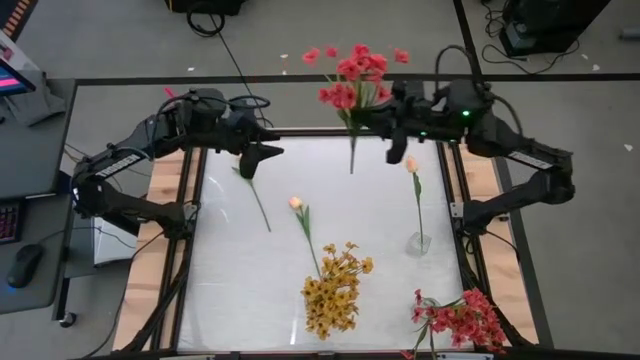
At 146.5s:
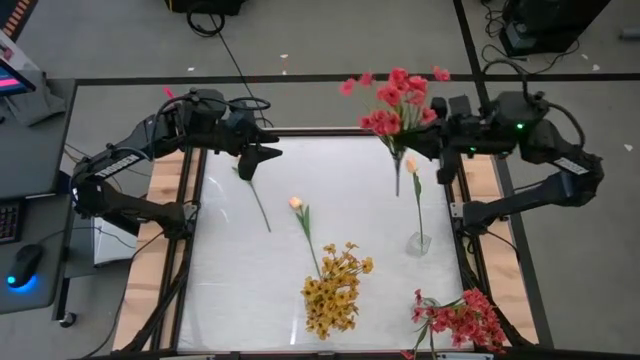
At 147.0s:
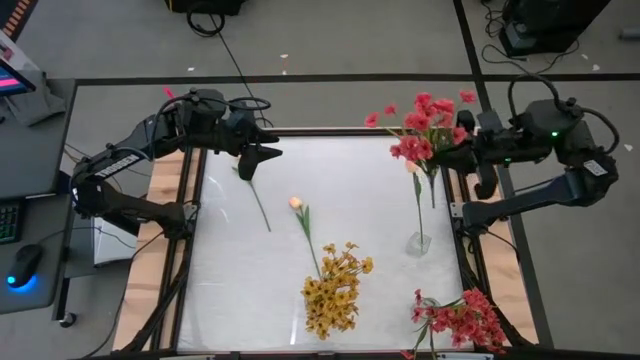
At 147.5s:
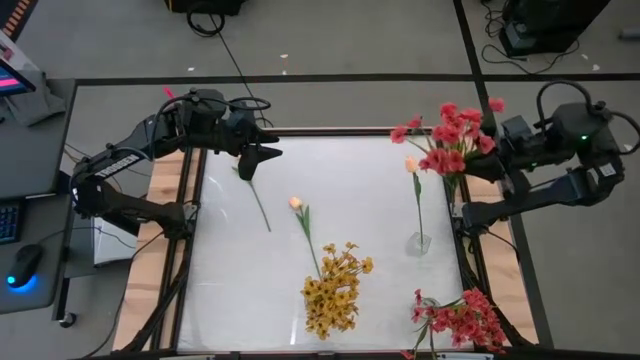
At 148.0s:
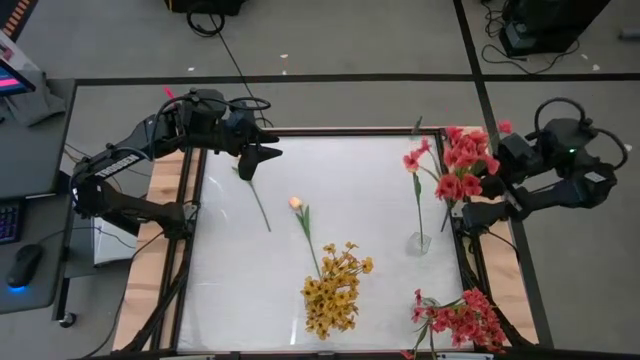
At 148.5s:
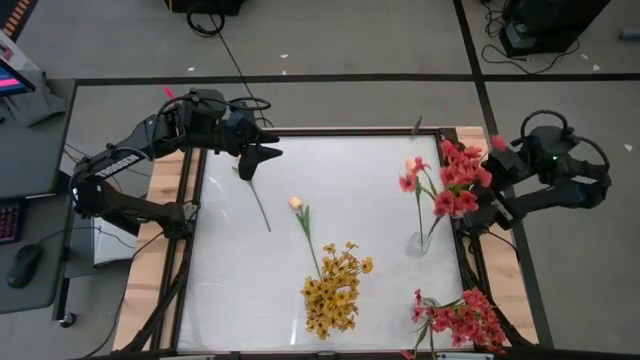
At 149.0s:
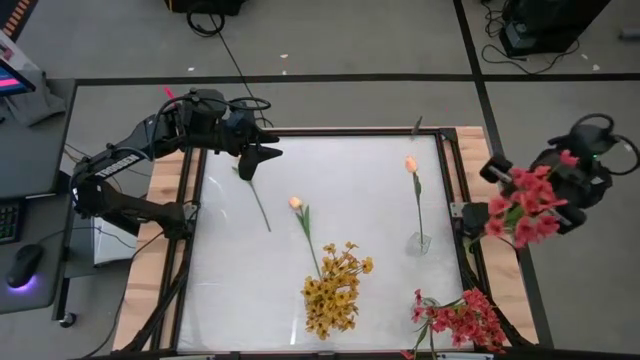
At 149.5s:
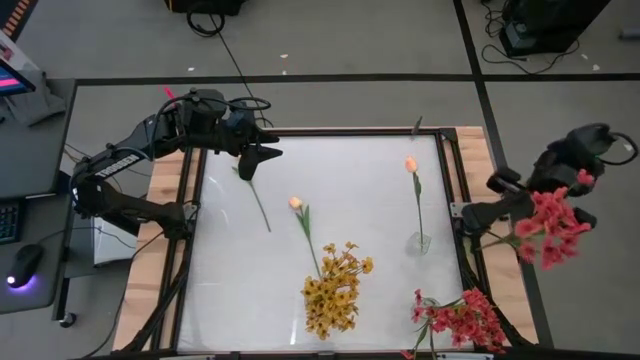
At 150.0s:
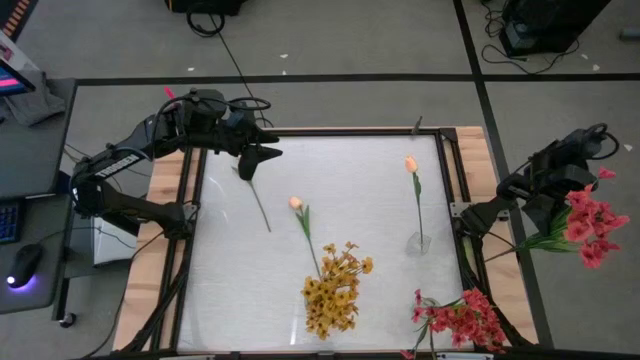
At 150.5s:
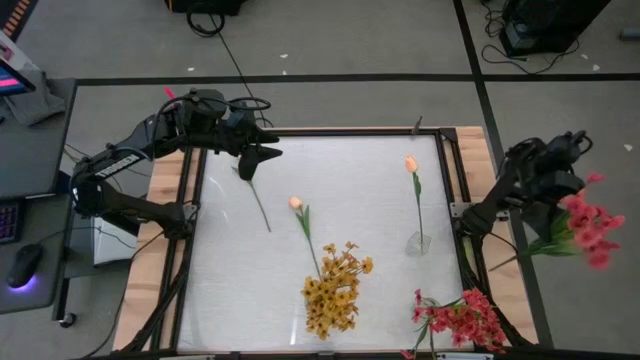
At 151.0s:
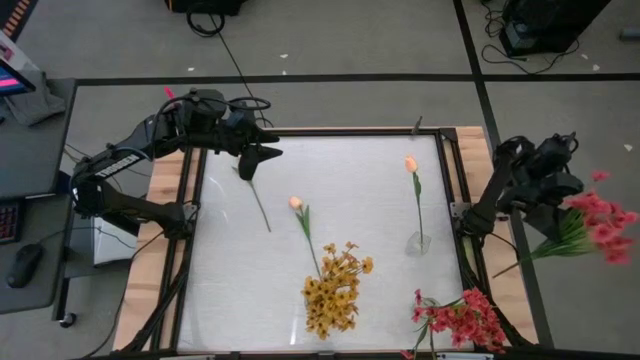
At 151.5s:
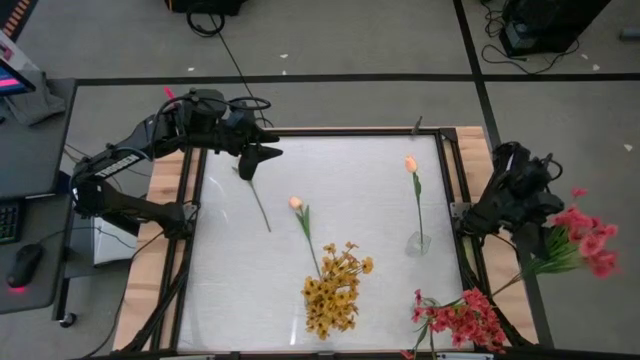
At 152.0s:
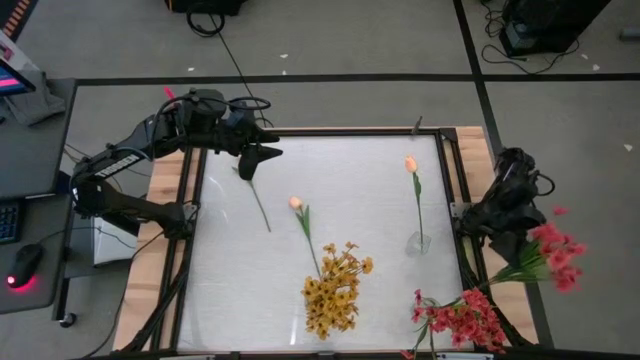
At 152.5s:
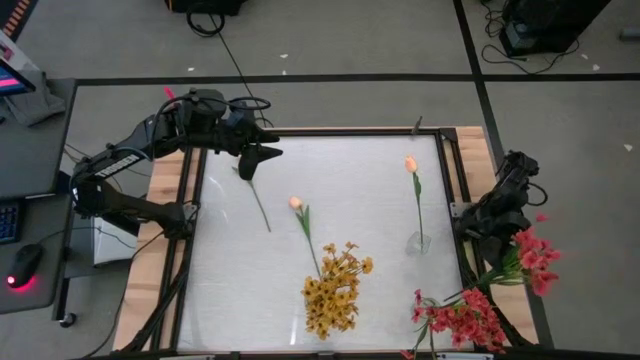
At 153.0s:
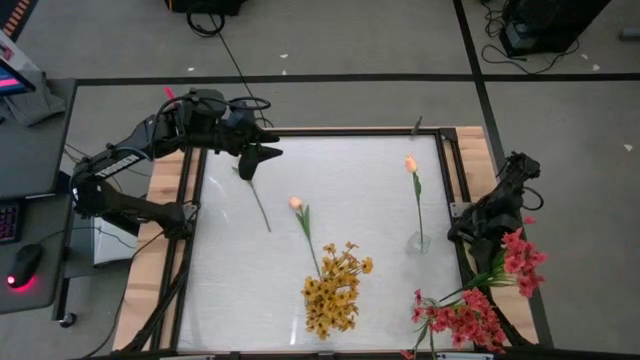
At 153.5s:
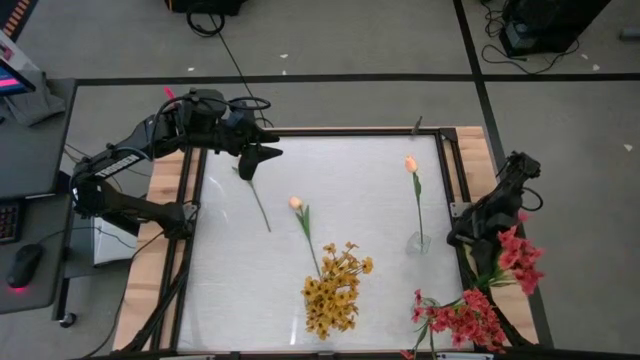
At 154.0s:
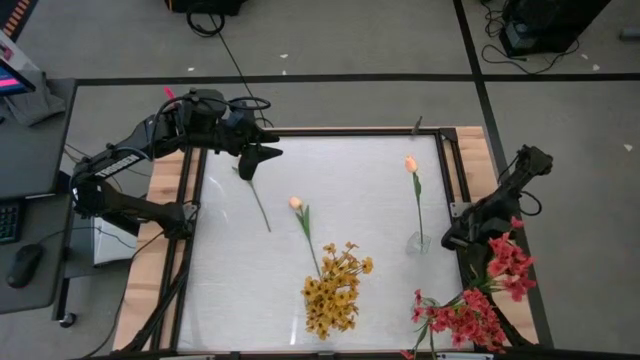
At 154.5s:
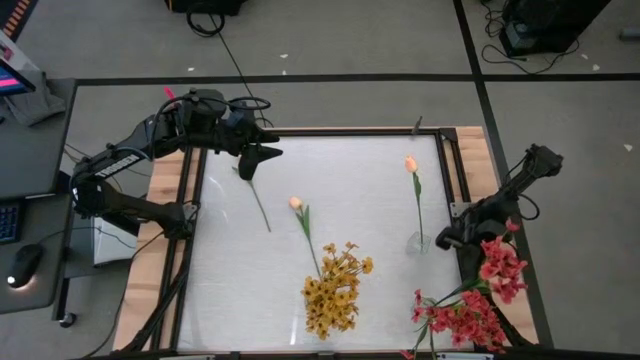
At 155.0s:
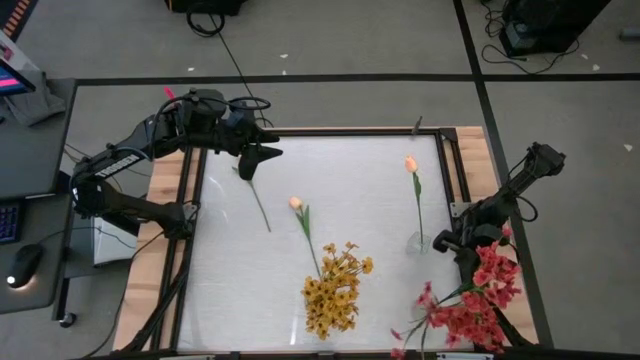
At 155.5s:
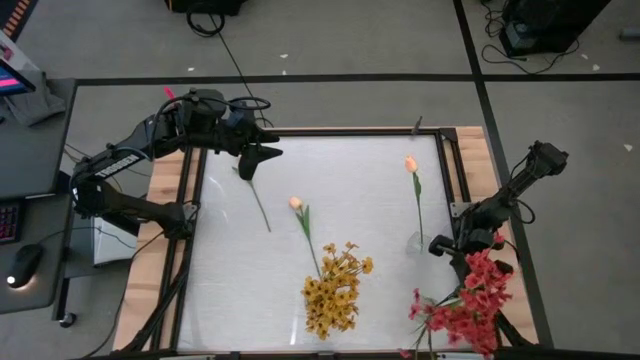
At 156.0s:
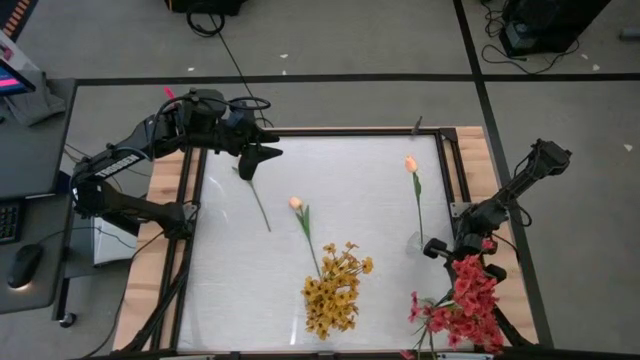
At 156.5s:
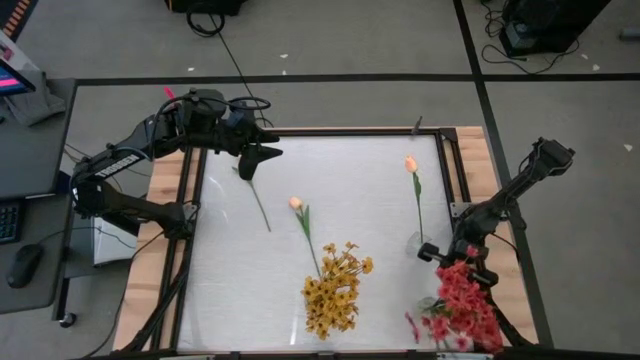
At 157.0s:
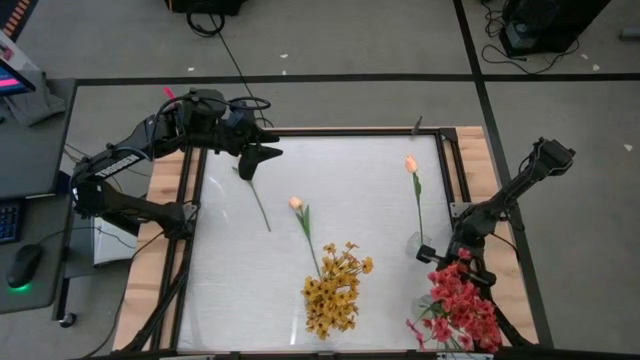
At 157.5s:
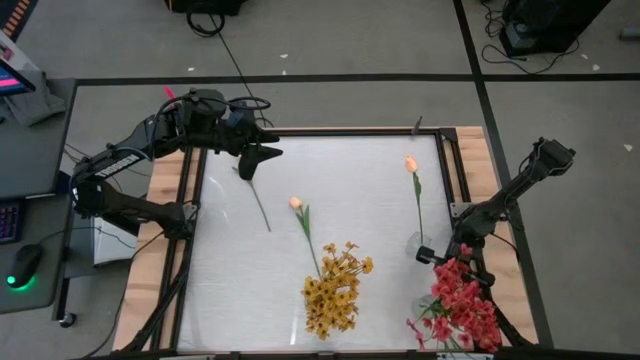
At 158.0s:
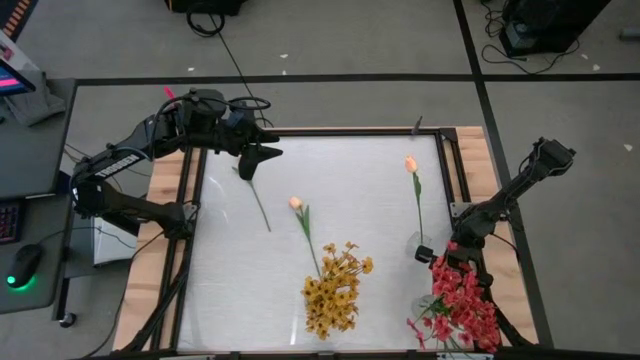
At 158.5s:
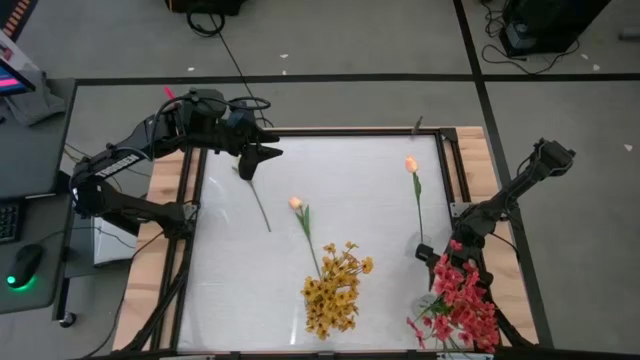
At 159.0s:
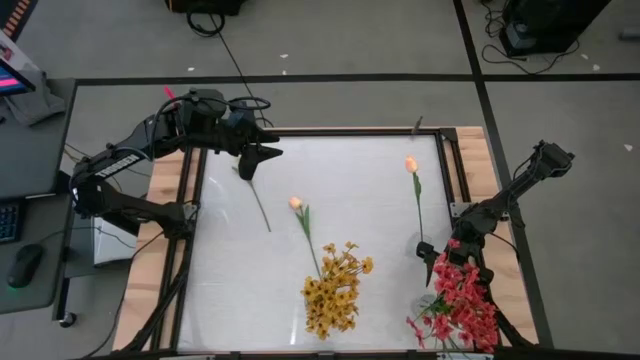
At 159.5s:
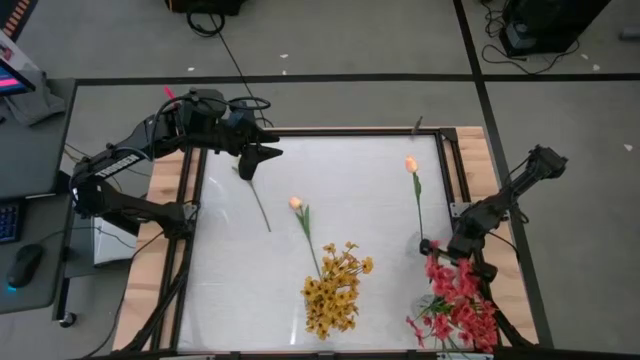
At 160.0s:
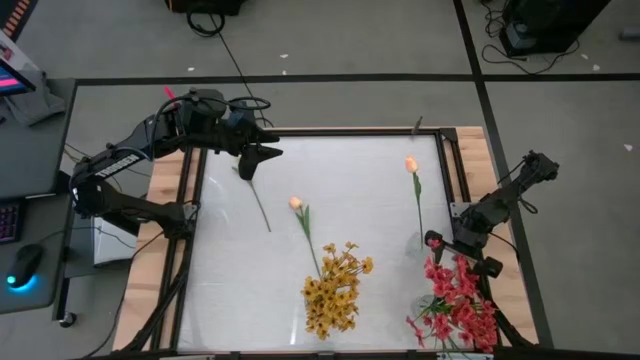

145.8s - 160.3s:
Task: Sort flowers into vase by color
Put the pink flowers into the bottom right transparent vase

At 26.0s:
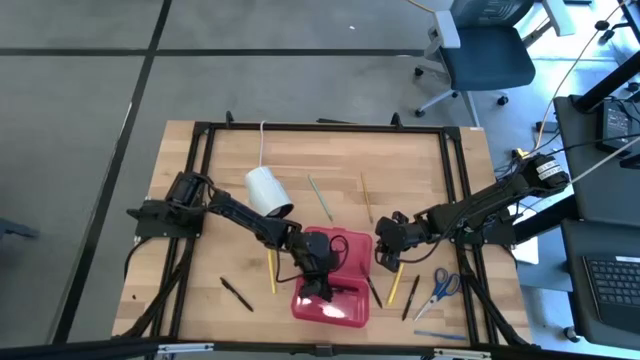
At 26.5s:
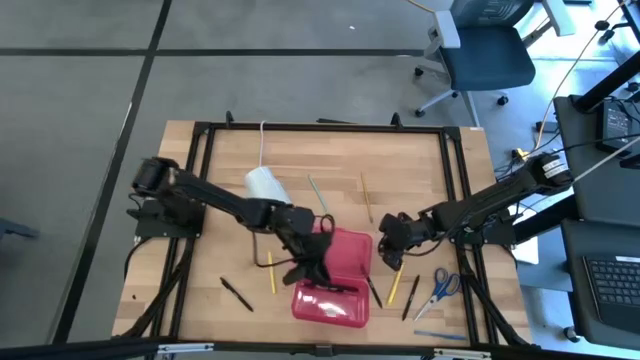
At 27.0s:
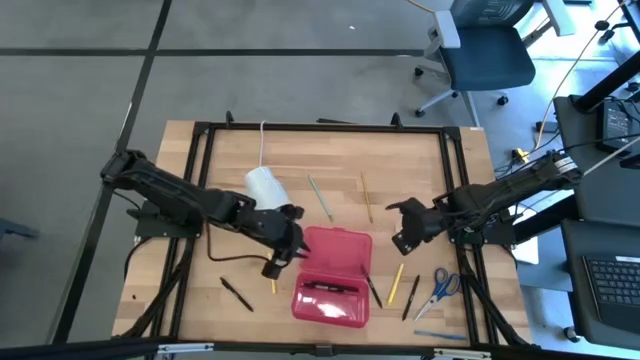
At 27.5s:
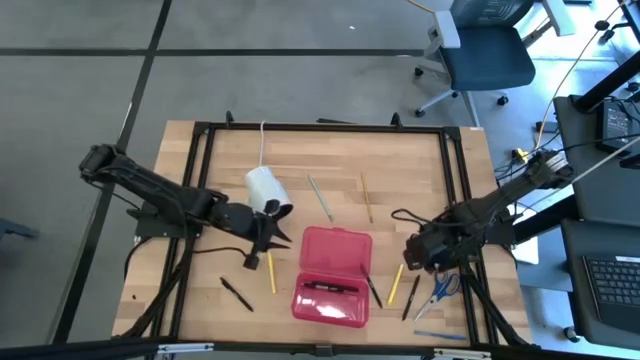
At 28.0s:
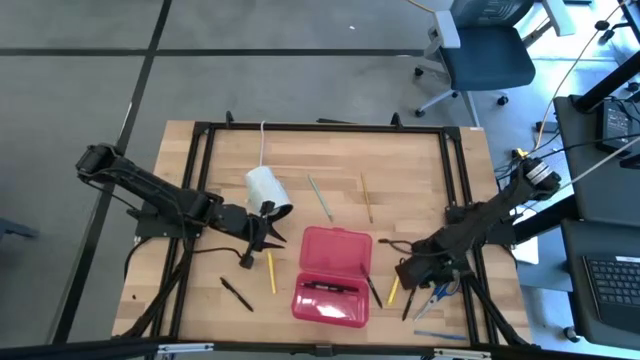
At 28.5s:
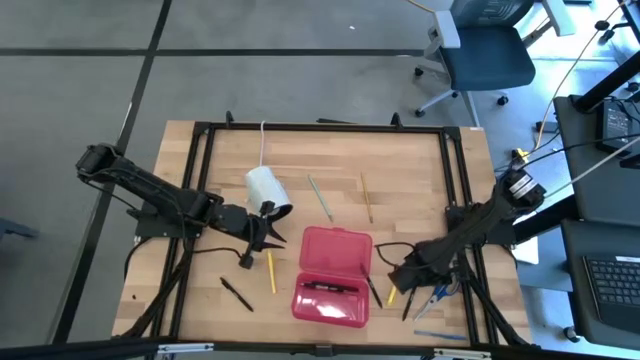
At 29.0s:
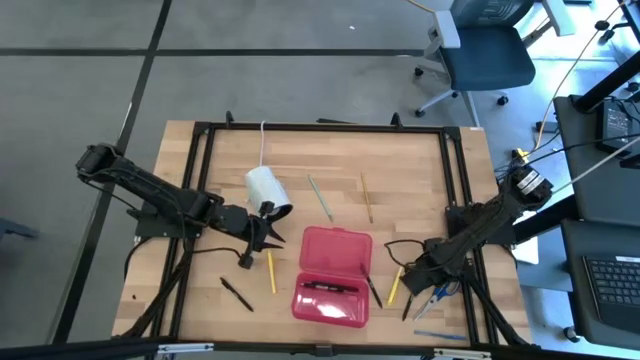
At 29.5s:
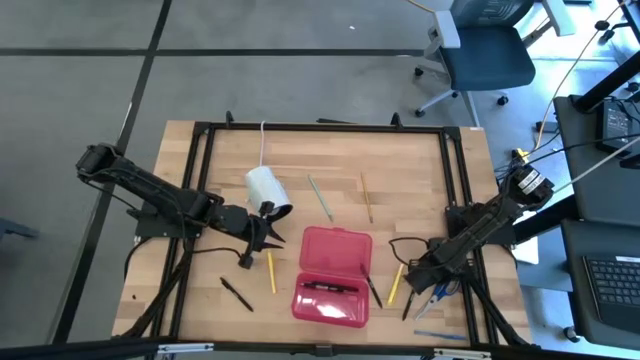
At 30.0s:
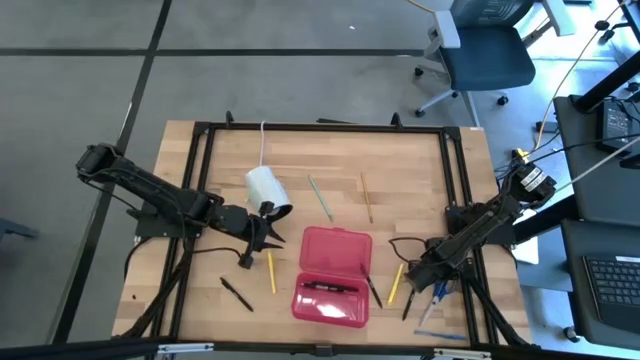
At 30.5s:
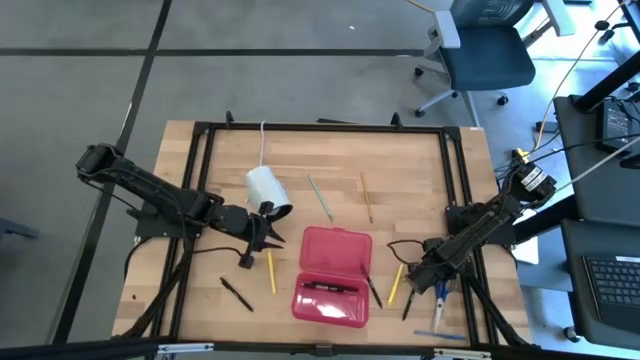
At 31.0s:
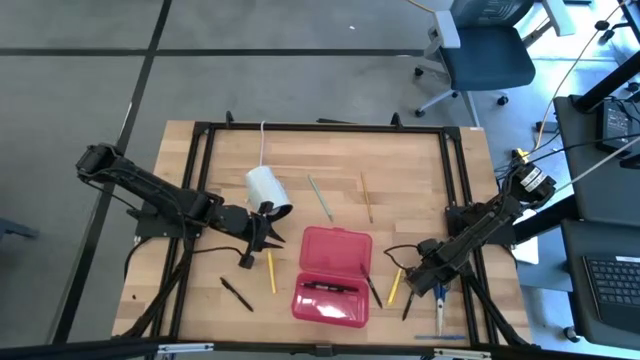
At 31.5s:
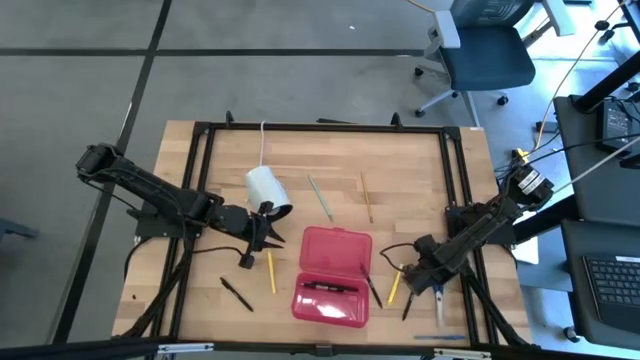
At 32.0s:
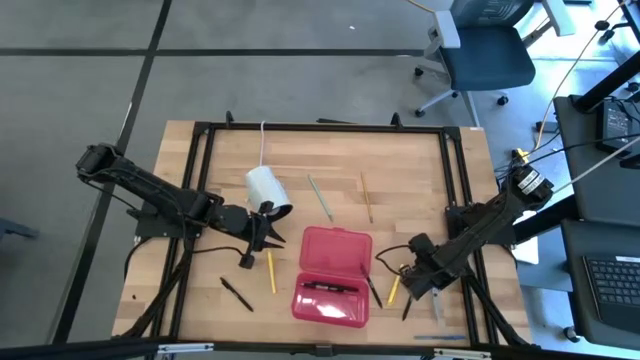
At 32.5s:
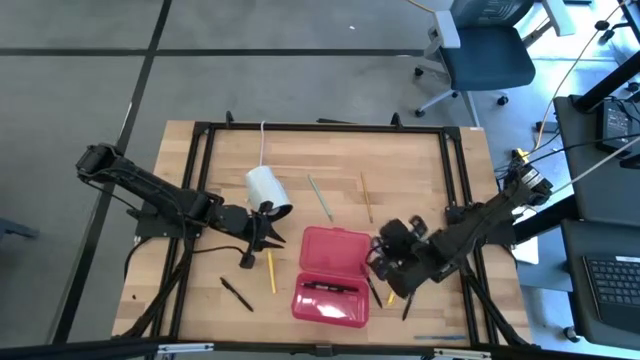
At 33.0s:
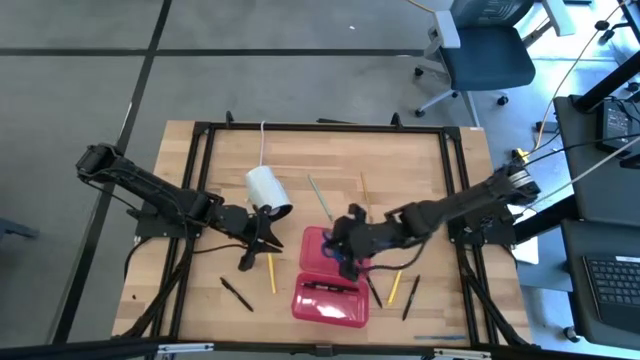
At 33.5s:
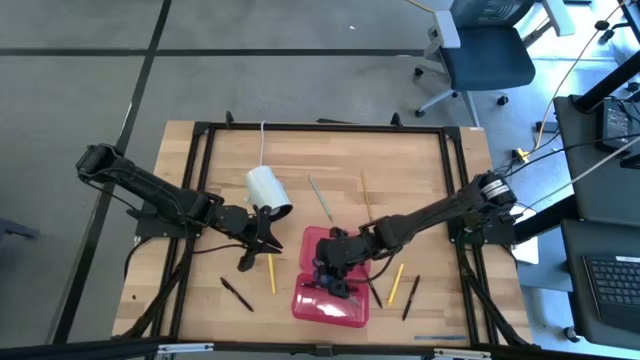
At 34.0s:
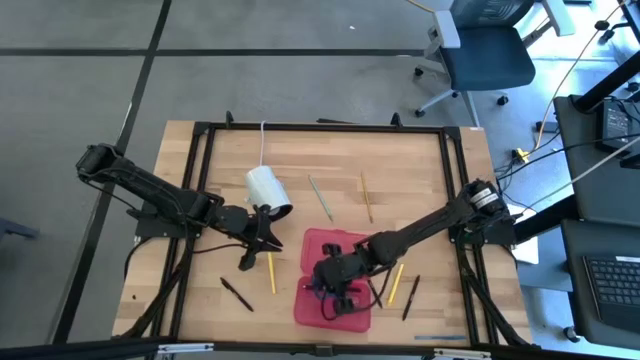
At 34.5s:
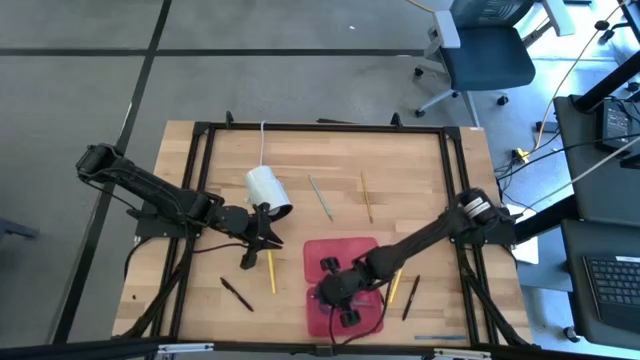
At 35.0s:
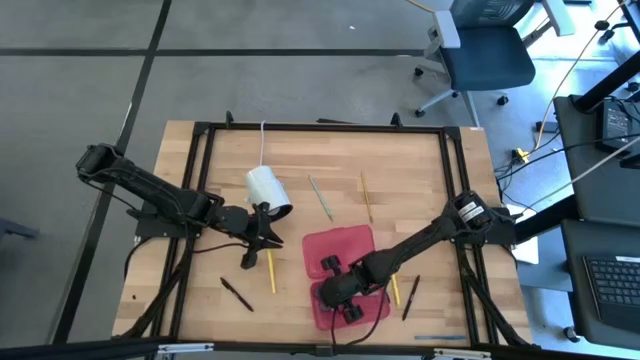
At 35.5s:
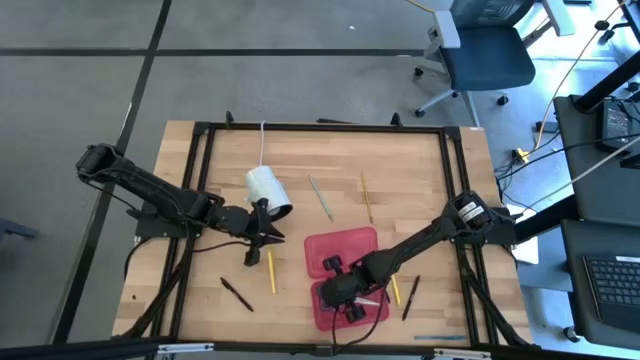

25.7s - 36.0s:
Task: Pick & place school supplies into a supply box
Put the blue scissors into the pink supply box
